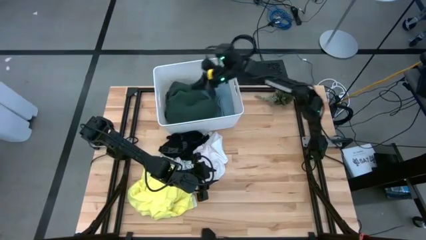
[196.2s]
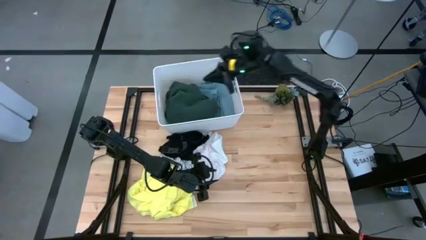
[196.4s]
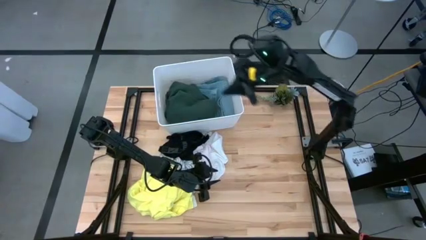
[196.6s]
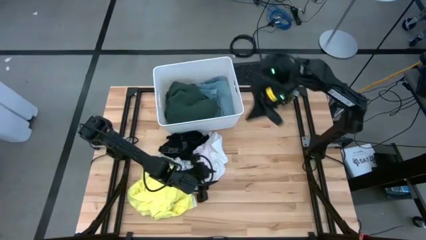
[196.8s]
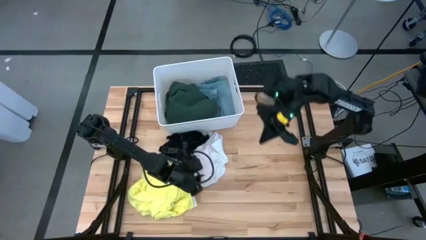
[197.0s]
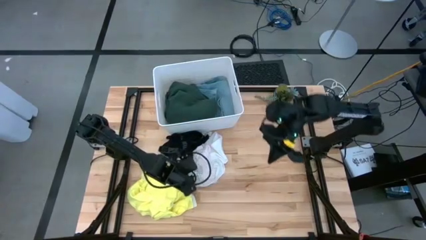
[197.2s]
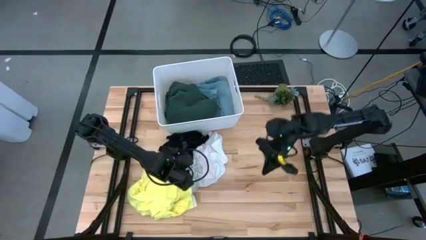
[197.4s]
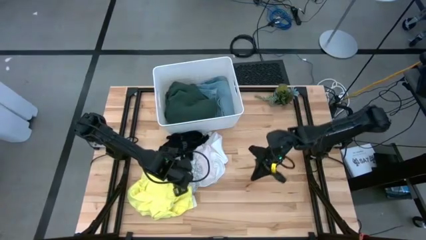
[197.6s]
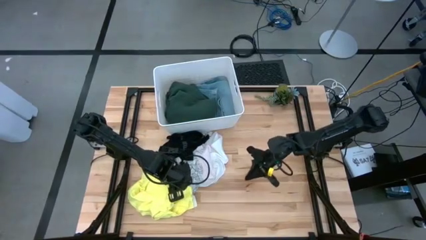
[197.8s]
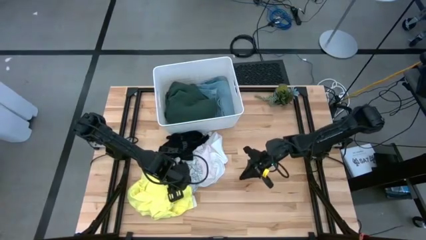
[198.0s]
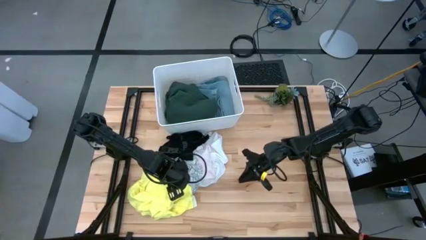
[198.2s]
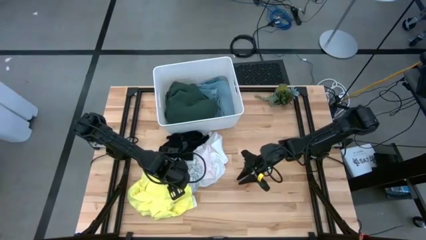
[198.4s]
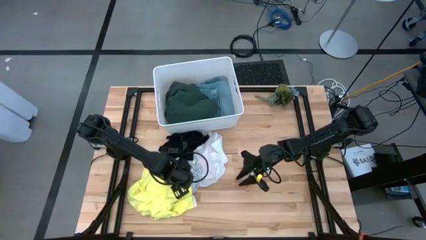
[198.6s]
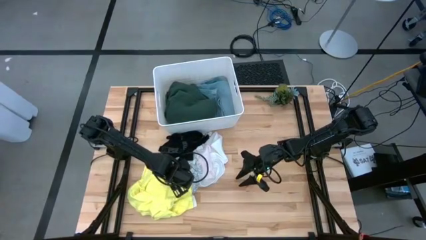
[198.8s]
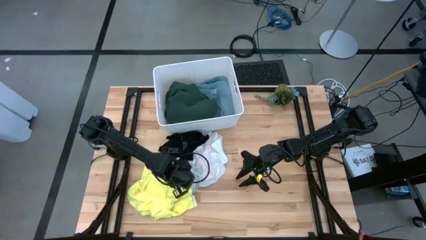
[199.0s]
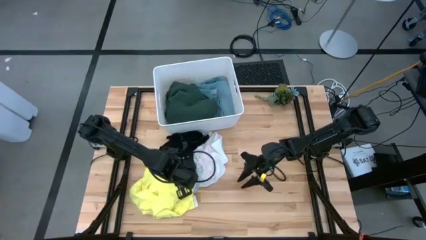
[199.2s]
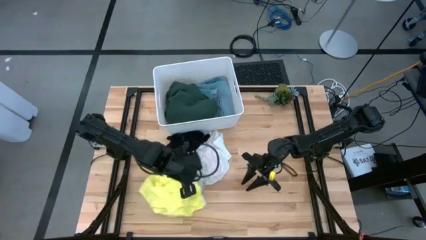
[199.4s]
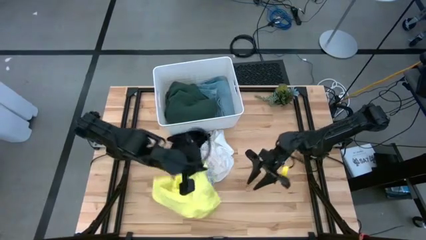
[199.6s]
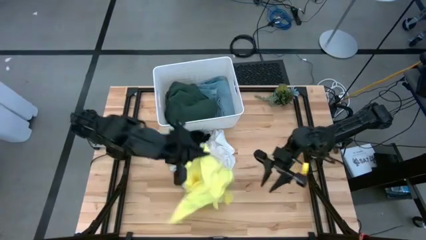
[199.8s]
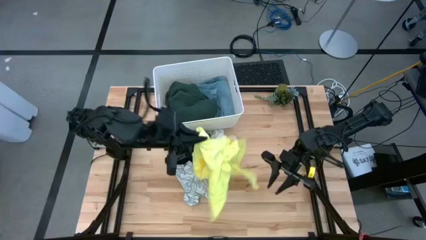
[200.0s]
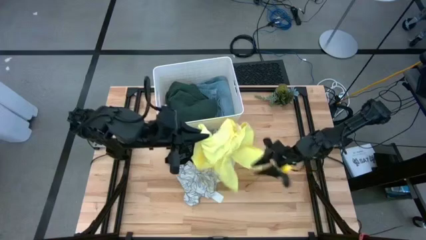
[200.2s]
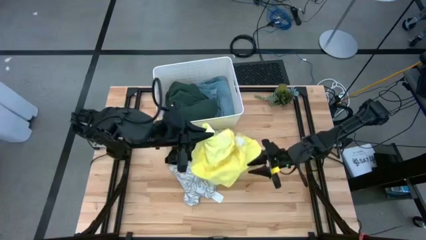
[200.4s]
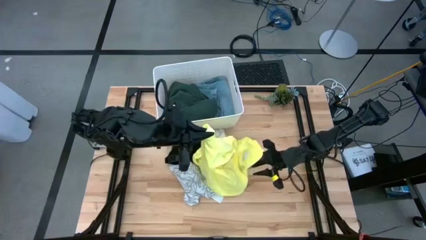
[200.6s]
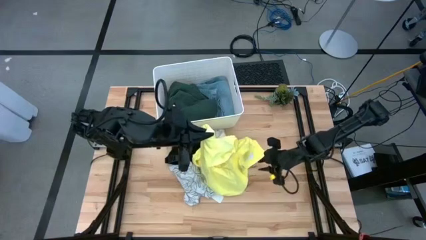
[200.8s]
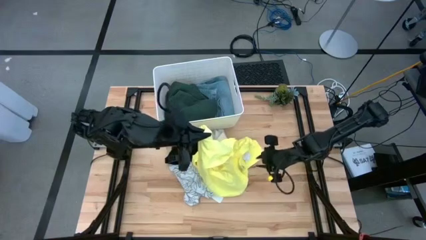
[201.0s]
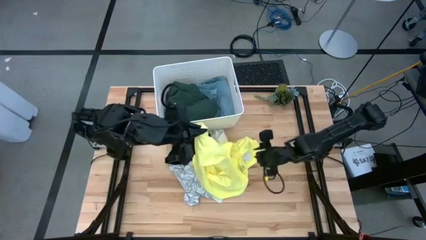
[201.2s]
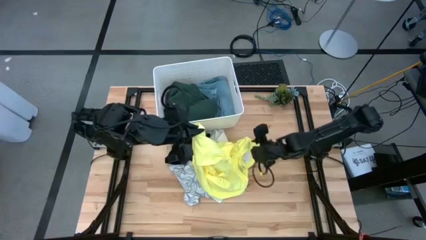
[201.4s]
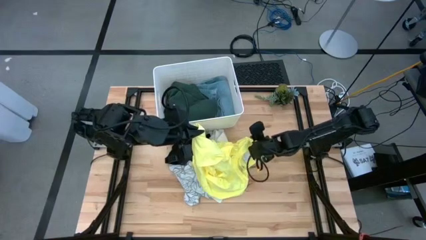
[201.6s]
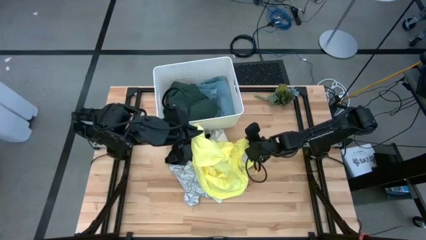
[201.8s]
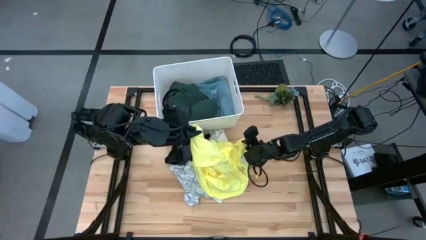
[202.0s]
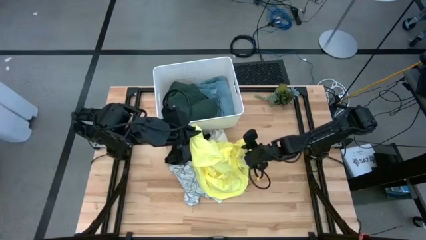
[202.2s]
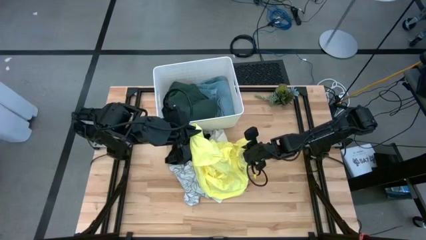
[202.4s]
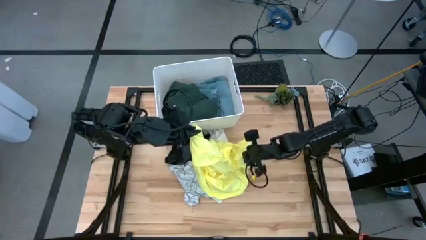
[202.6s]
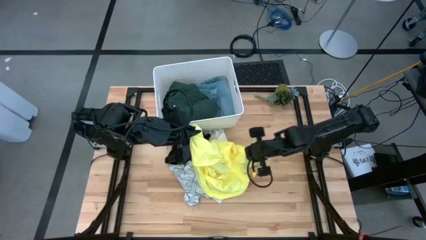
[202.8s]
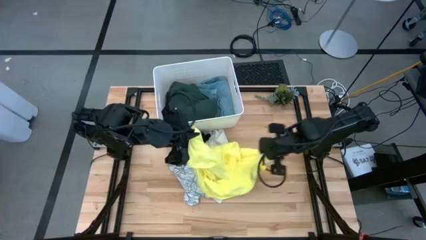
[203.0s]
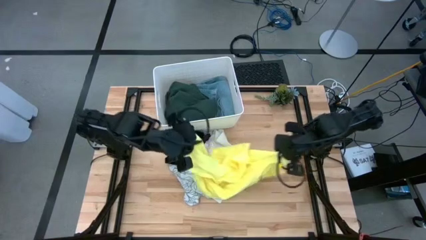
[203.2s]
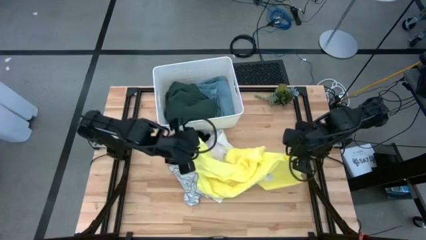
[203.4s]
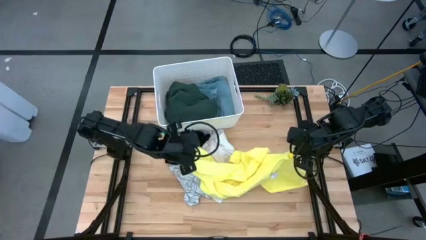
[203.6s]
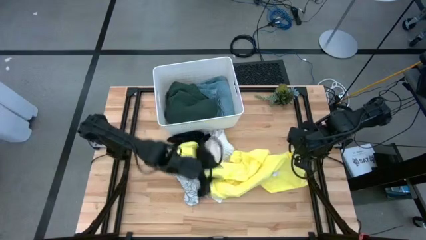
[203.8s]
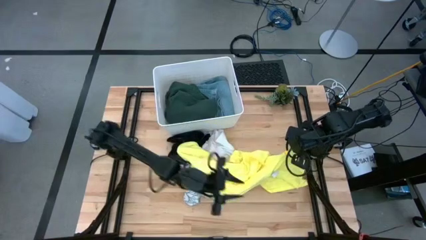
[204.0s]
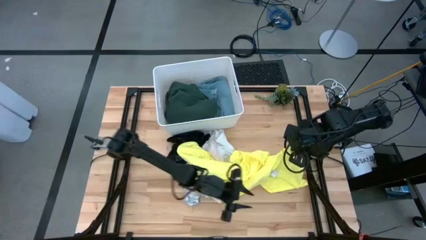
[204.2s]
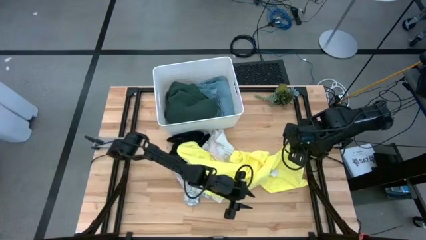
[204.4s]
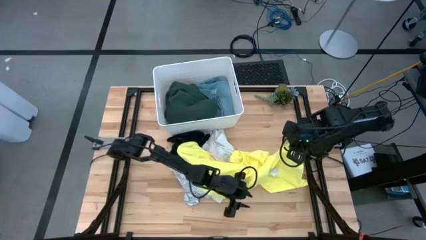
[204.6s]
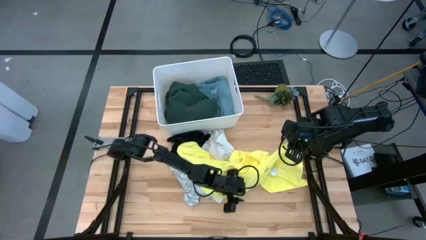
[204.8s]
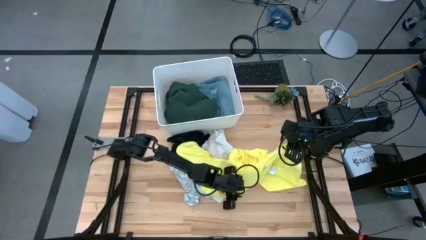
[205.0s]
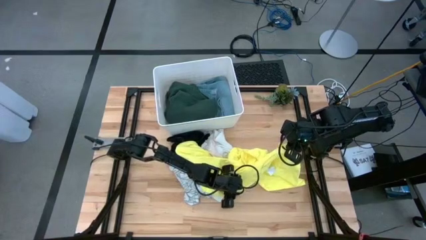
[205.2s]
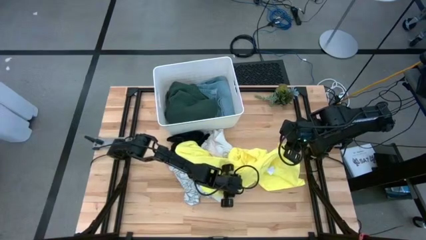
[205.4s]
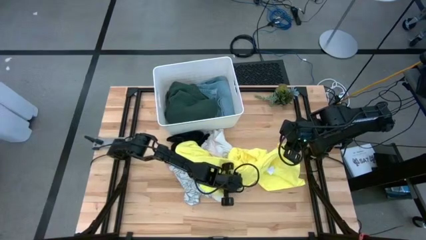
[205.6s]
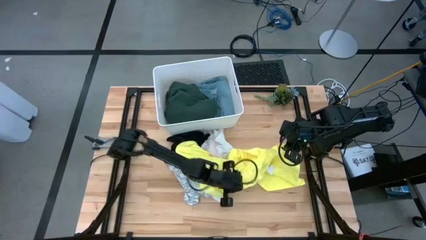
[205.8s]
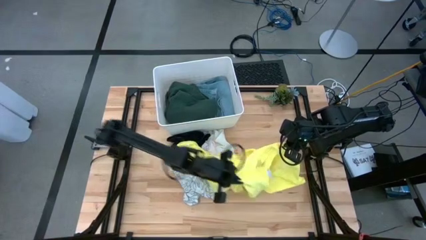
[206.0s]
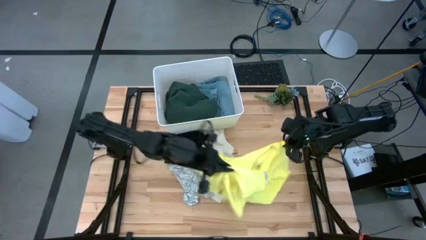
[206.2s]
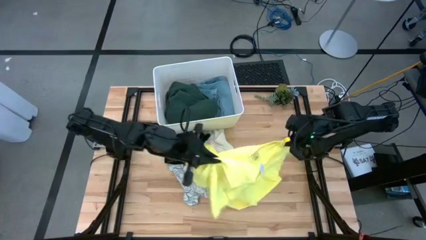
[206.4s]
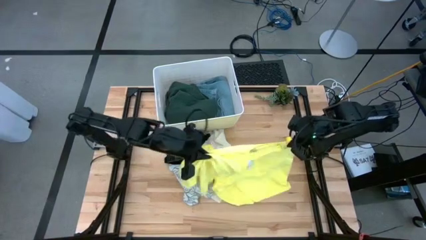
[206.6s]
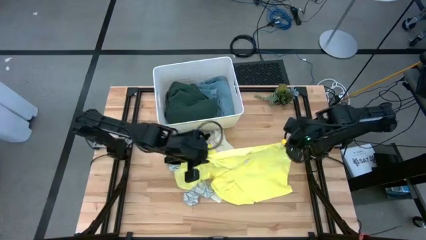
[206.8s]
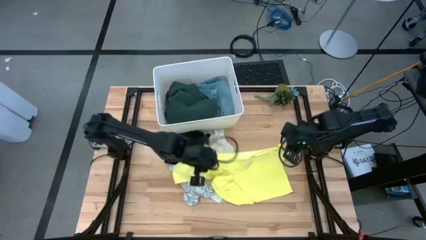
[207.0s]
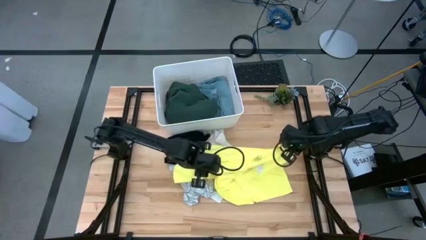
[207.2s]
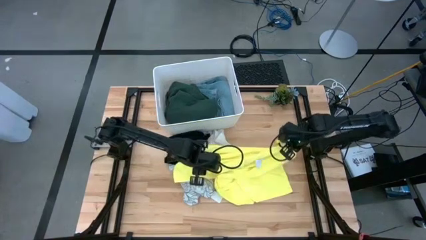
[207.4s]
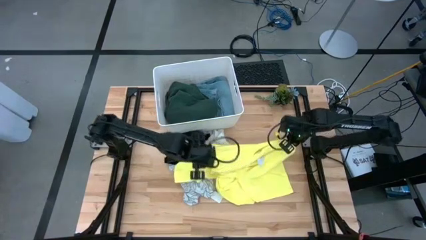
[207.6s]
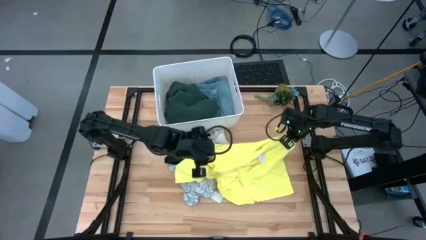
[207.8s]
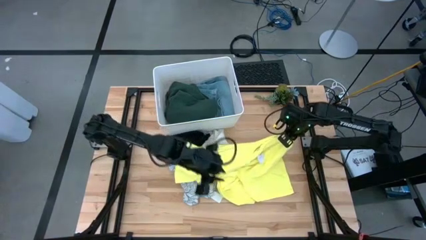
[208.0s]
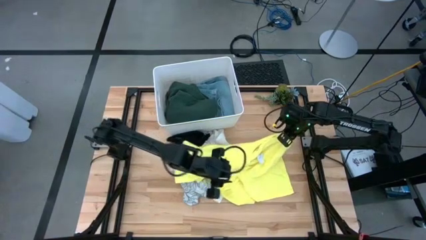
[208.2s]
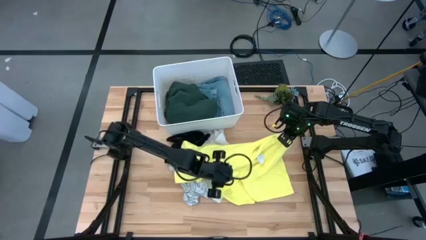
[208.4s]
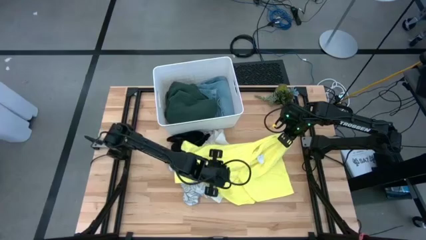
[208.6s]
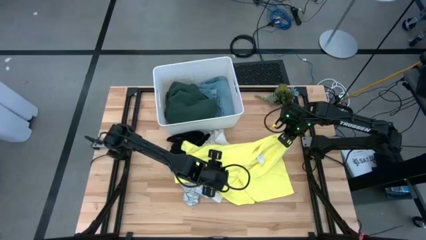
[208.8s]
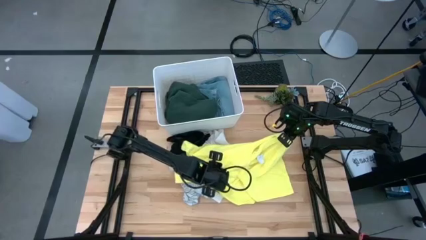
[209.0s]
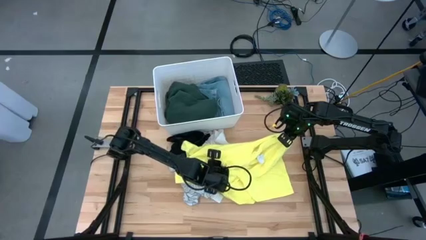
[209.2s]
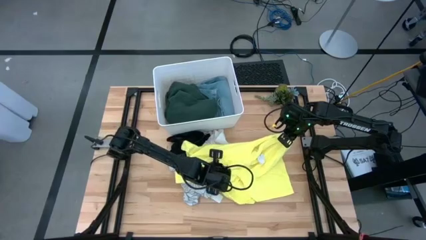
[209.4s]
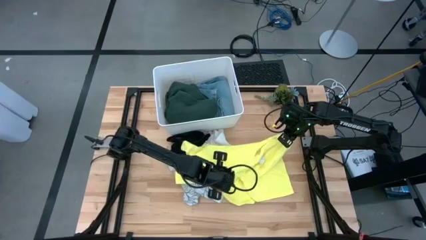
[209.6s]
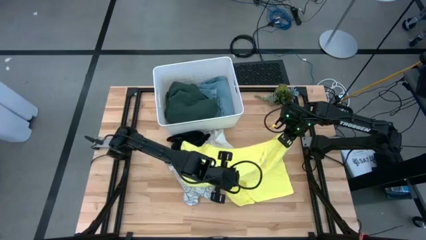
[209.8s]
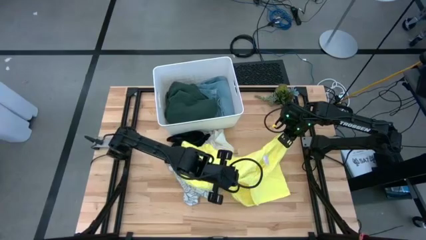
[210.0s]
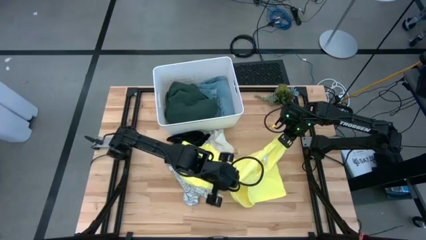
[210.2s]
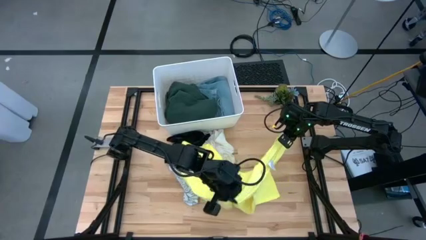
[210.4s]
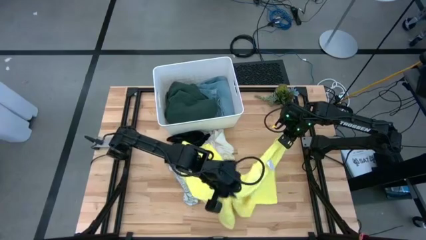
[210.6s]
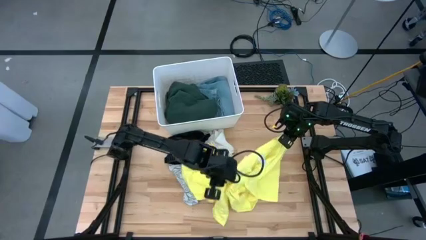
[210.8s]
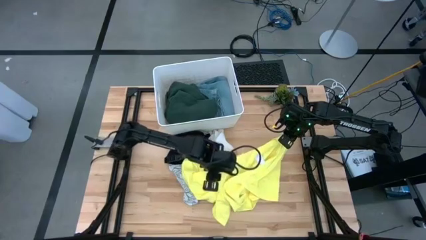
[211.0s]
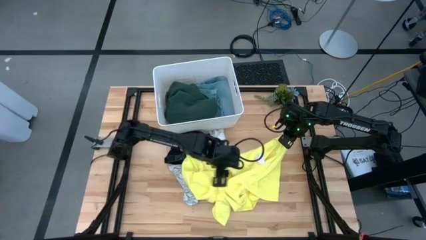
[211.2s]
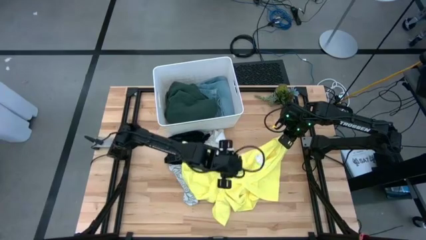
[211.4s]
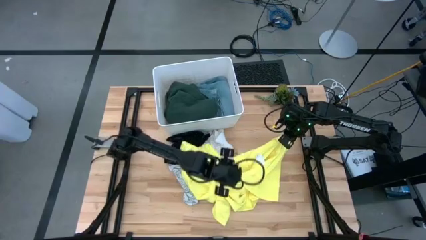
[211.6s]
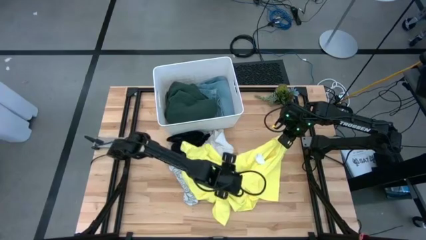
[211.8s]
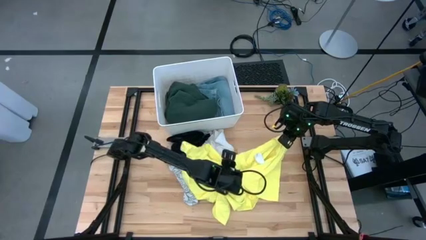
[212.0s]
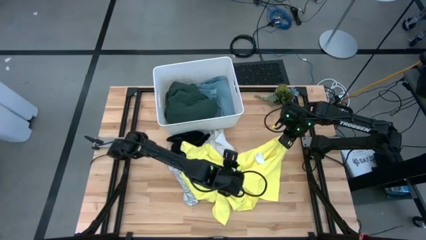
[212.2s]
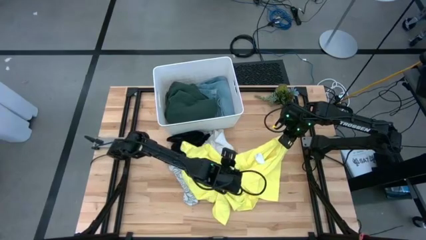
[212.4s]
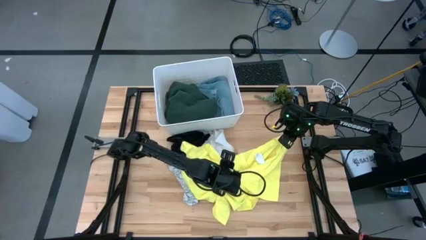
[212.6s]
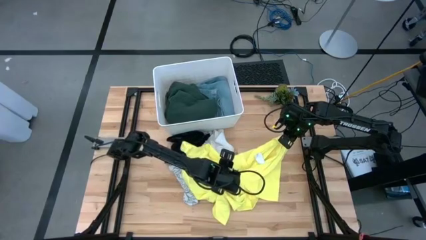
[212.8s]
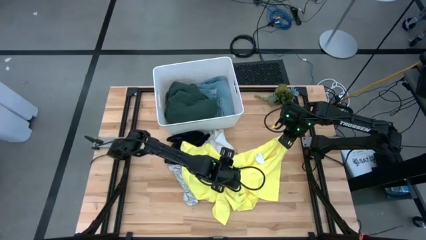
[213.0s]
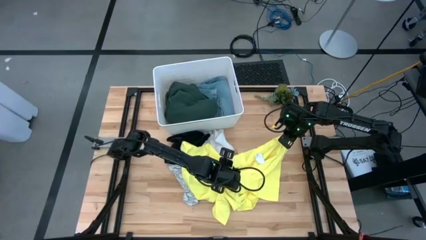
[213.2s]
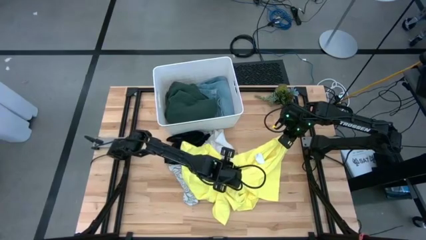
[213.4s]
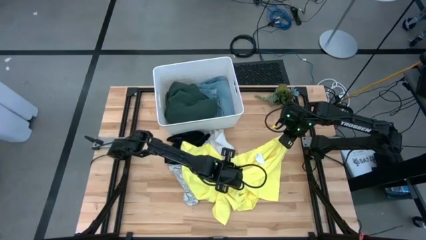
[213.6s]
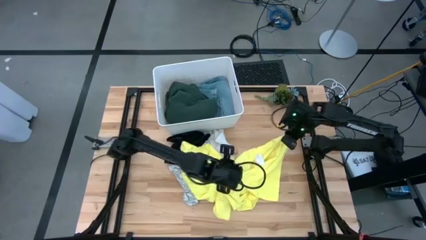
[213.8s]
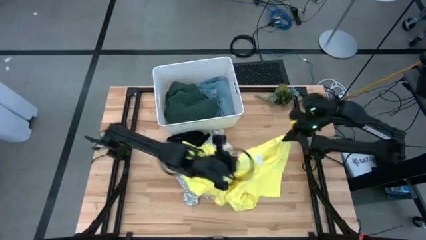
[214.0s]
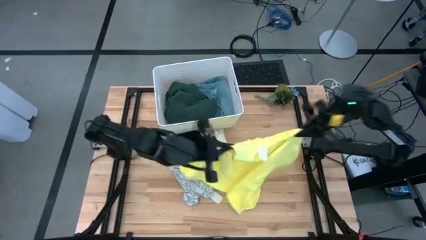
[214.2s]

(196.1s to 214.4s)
Task: Fold laundry
Fold the yellow shirt
